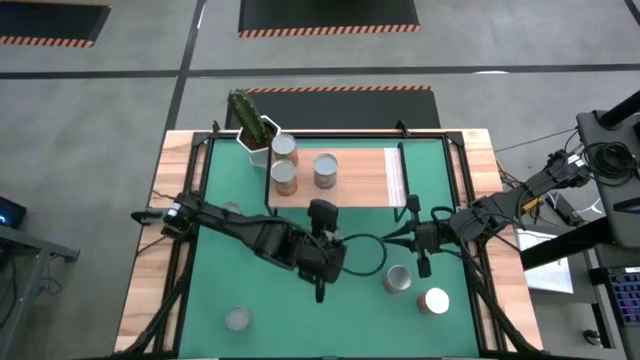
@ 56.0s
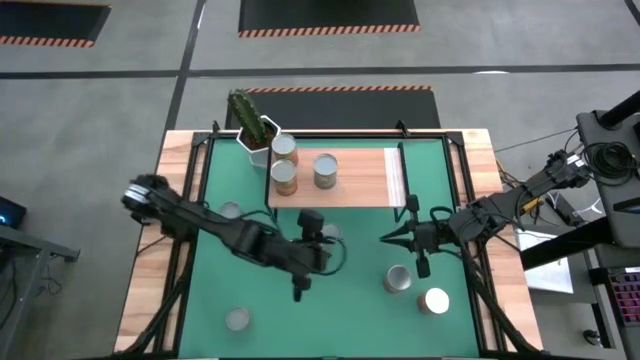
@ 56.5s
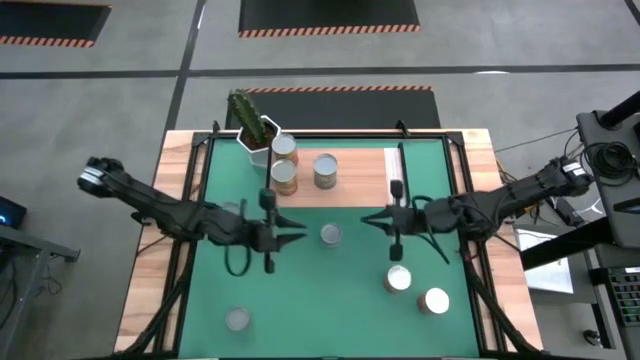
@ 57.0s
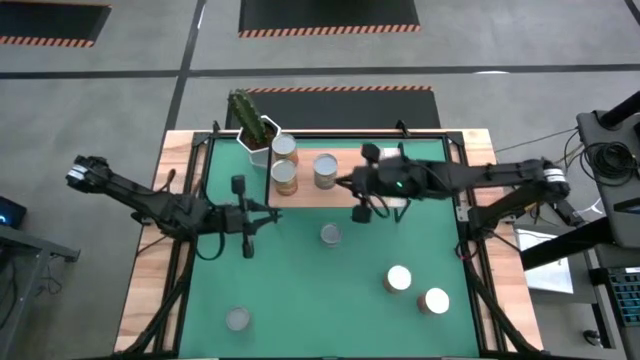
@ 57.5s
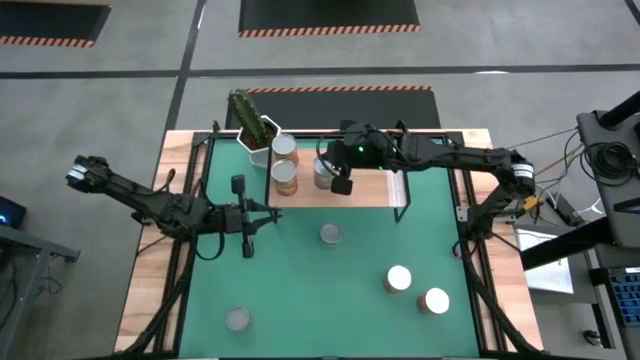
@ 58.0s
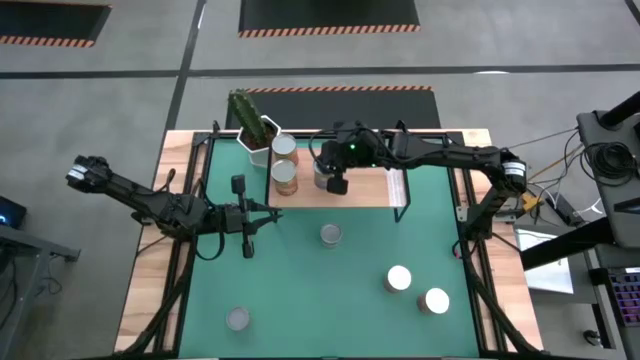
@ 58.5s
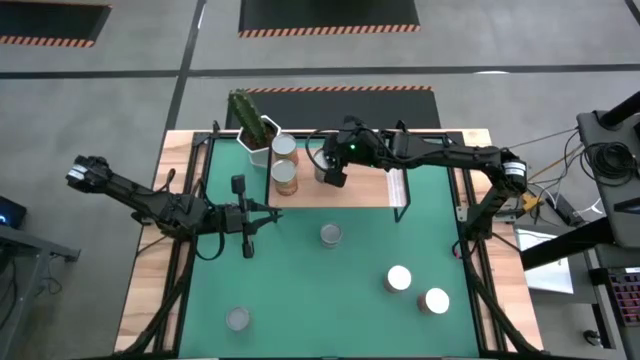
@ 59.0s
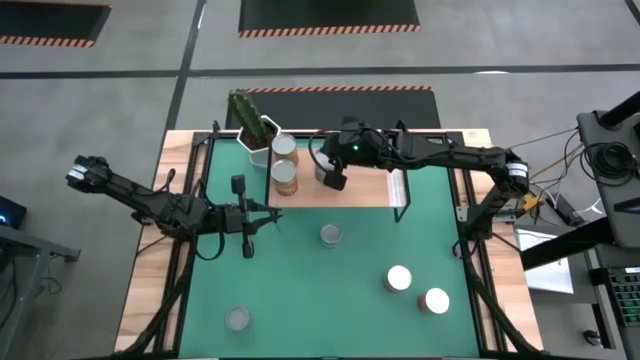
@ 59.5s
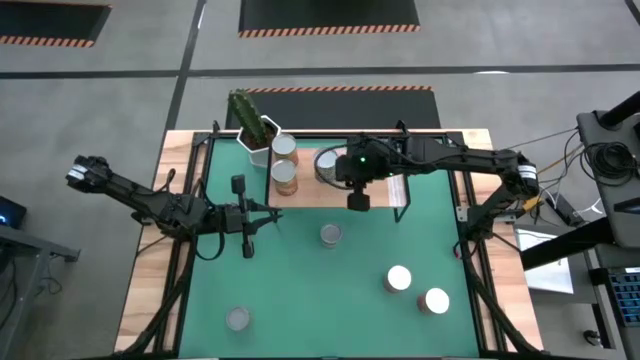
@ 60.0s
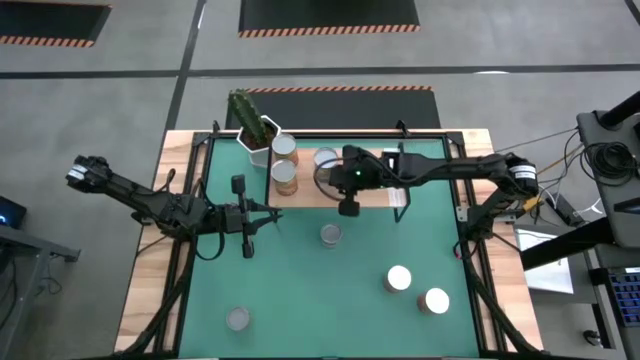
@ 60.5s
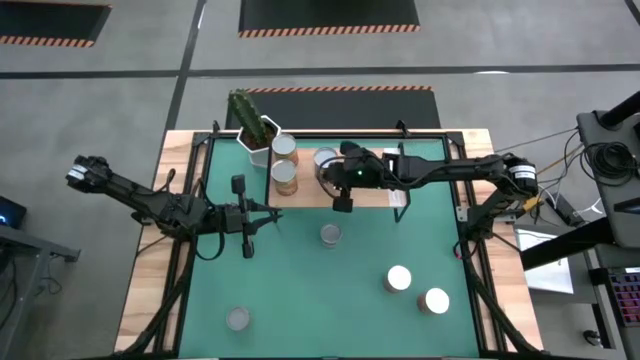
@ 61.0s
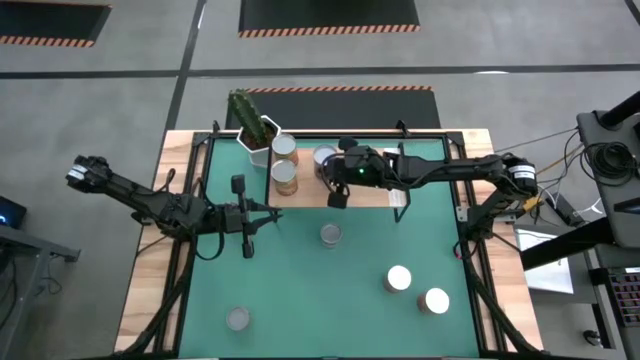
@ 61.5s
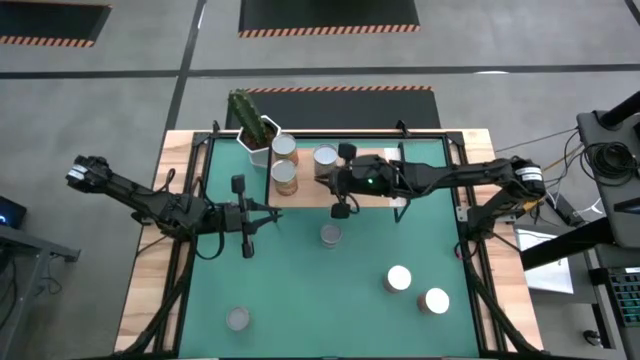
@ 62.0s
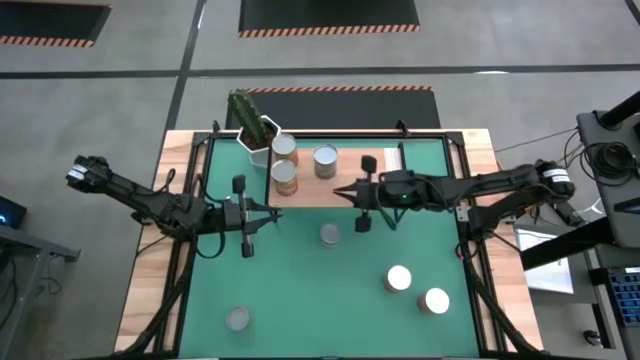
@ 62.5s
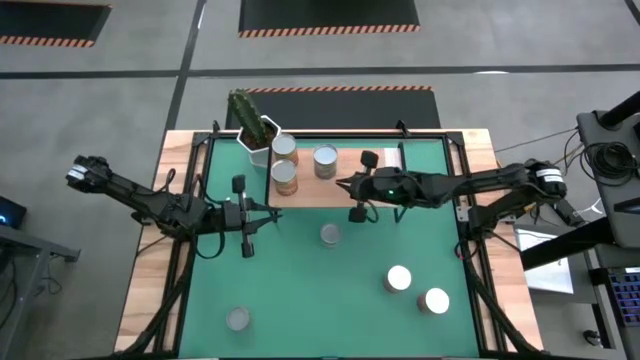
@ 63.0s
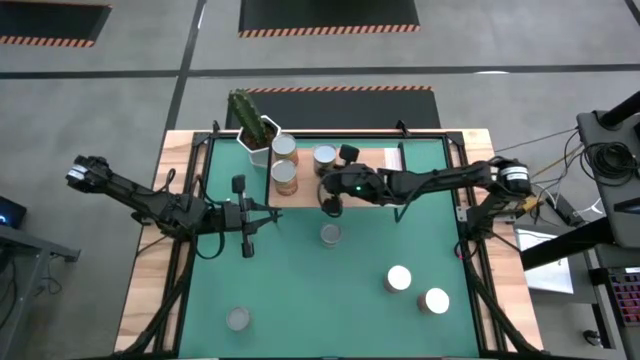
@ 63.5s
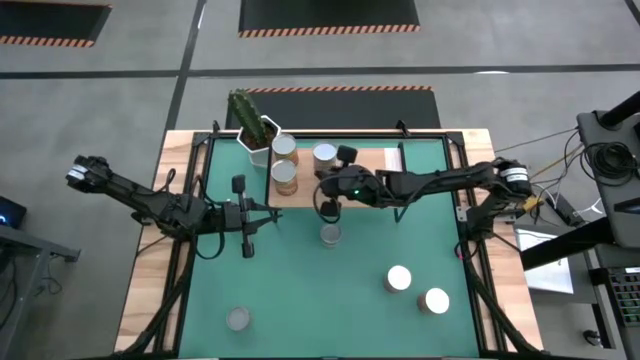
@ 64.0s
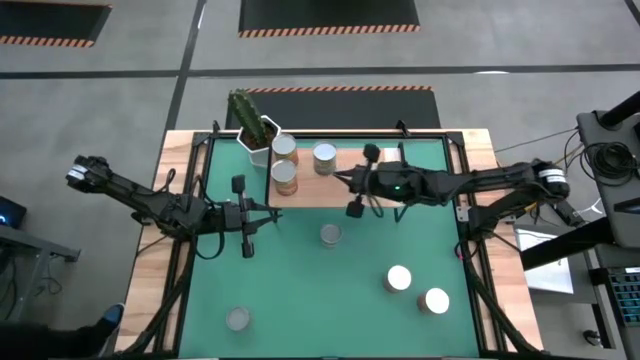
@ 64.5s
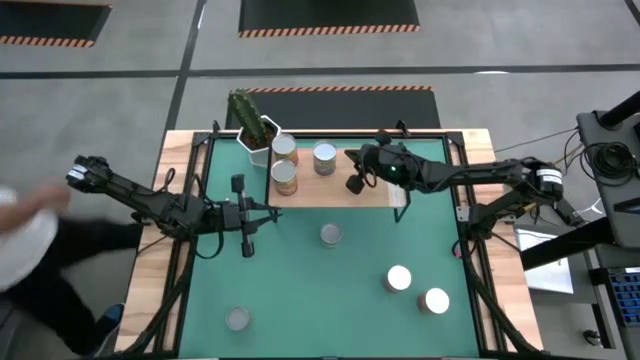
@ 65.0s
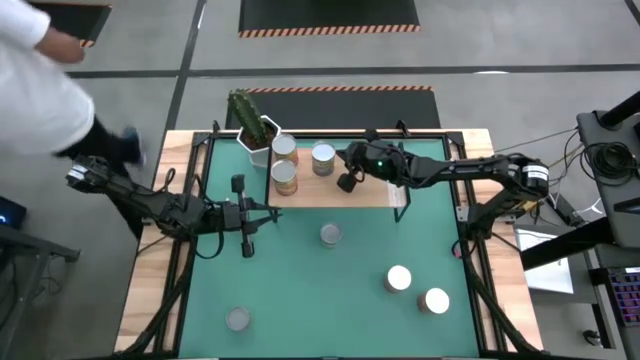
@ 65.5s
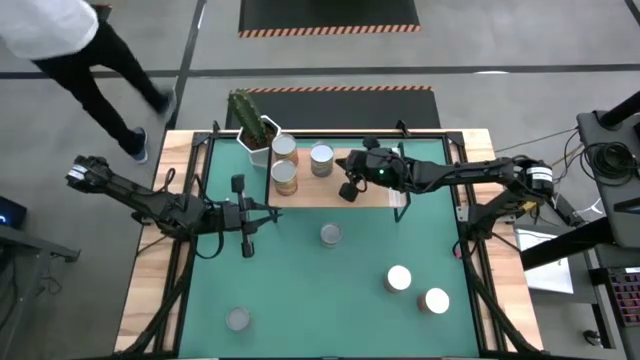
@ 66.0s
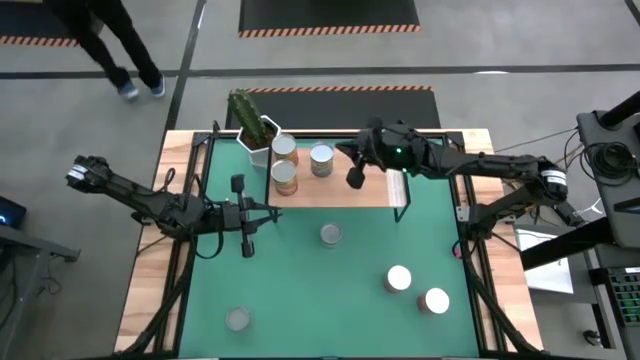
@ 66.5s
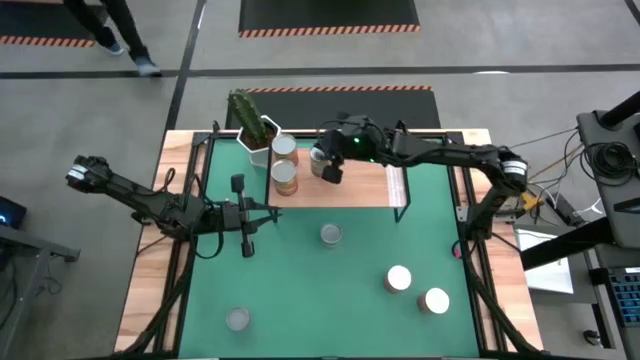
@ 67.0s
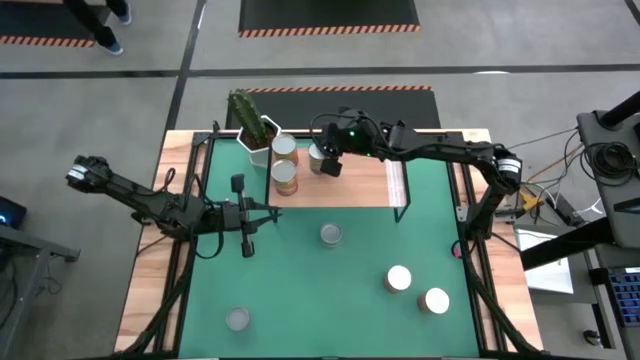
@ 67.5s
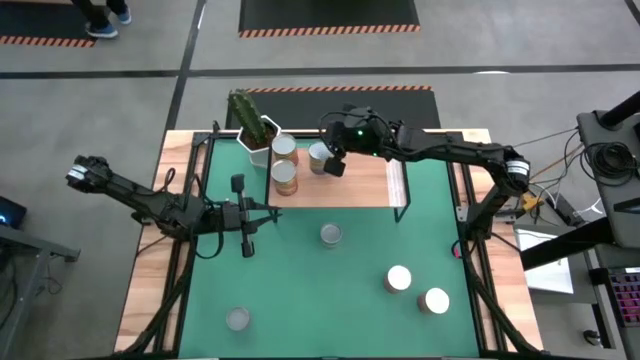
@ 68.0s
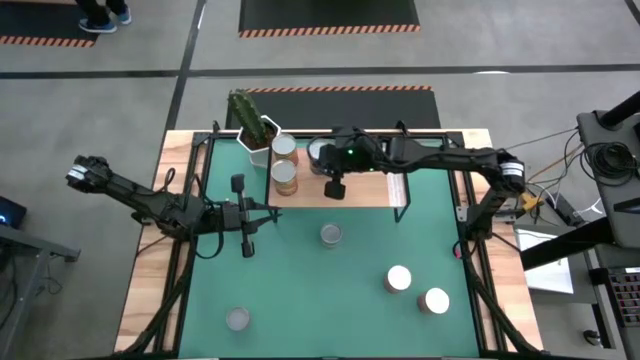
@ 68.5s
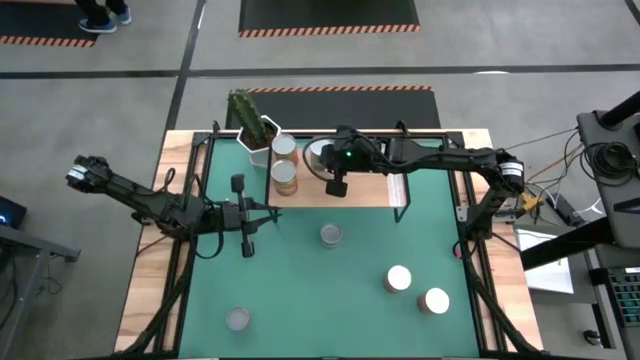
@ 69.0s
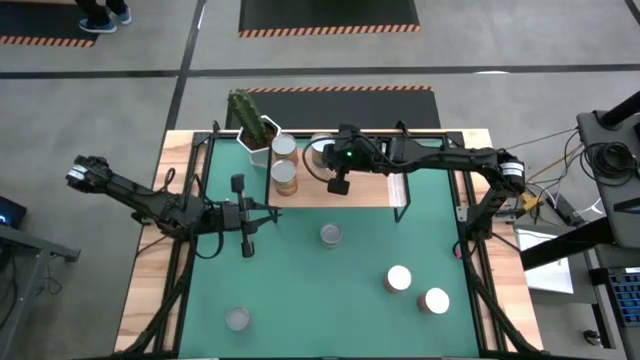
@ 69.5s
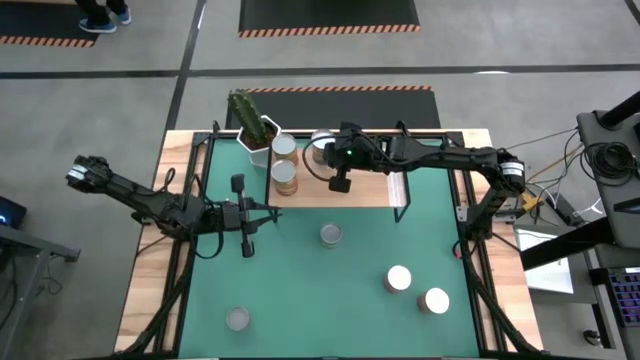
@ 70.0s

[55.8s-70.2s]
Task: Pick and place cans onto a shelf
Put the canned peas on the shelf

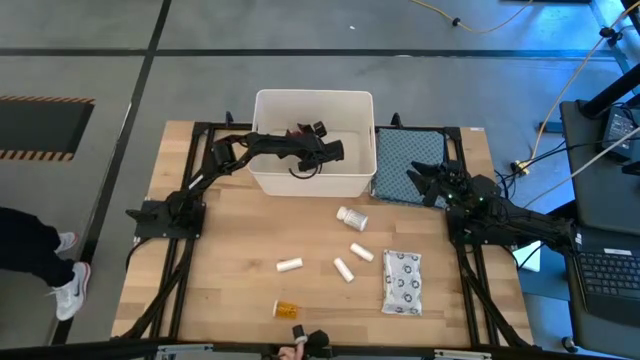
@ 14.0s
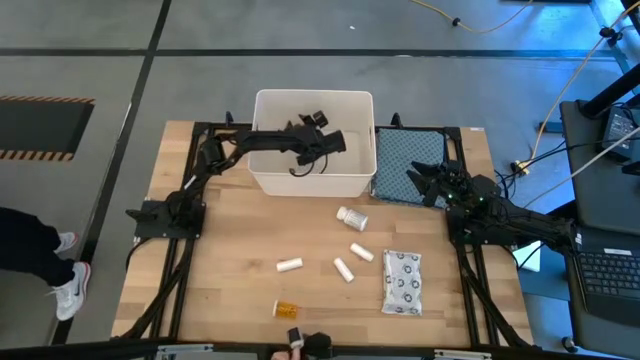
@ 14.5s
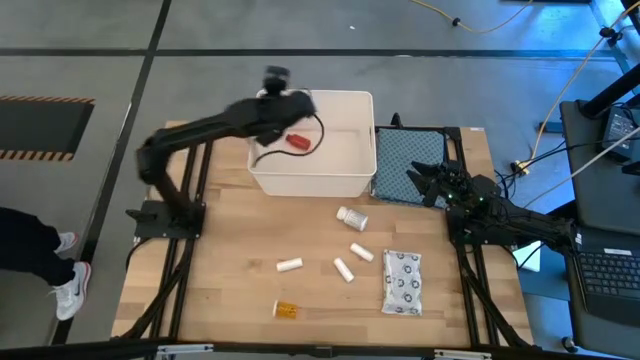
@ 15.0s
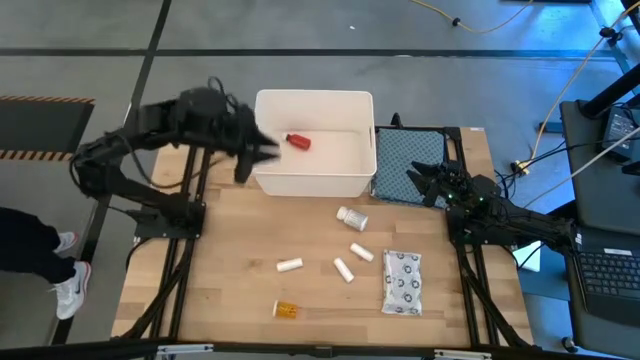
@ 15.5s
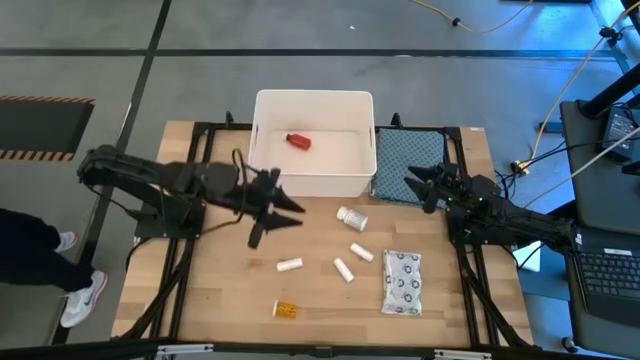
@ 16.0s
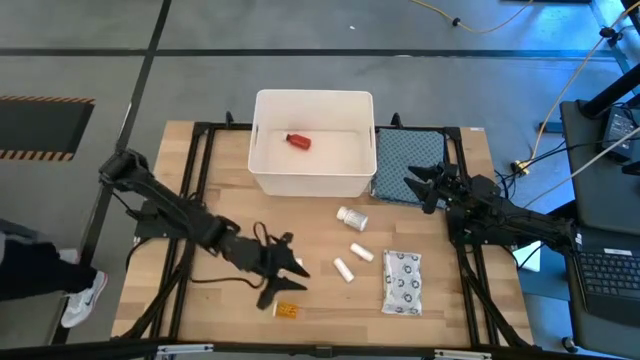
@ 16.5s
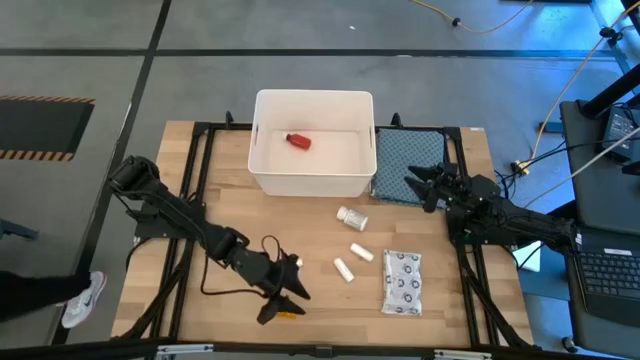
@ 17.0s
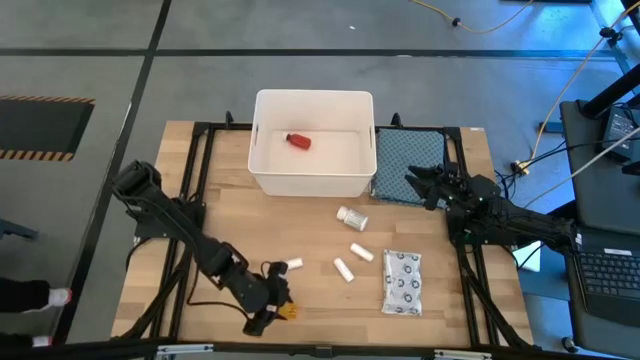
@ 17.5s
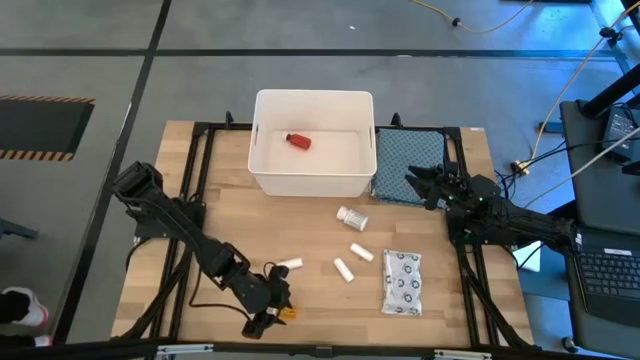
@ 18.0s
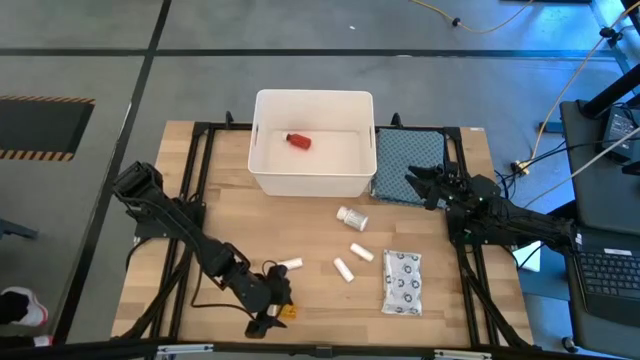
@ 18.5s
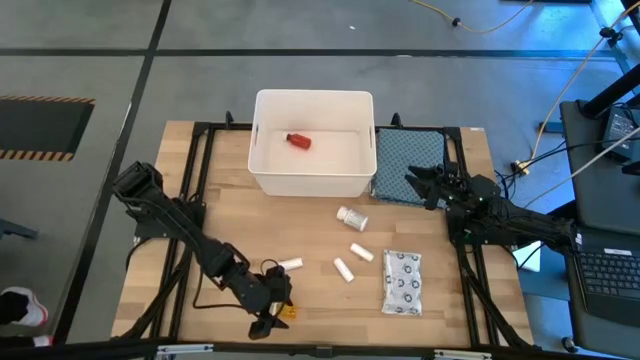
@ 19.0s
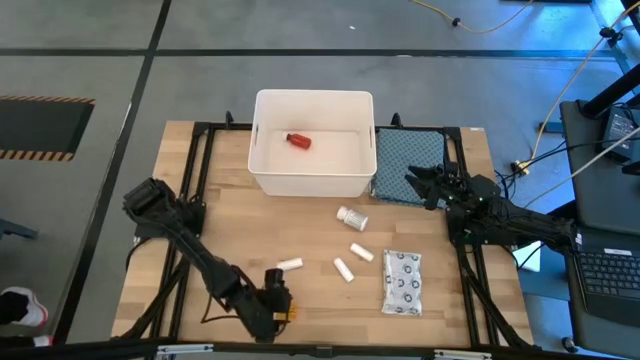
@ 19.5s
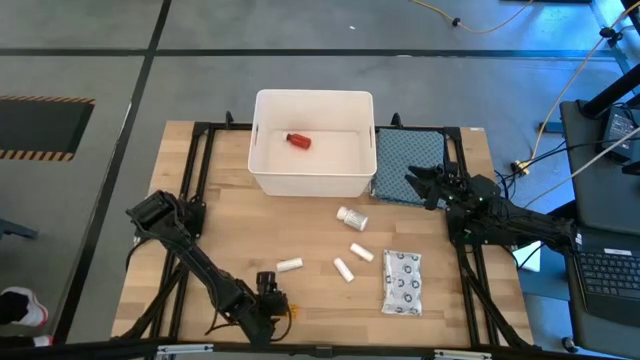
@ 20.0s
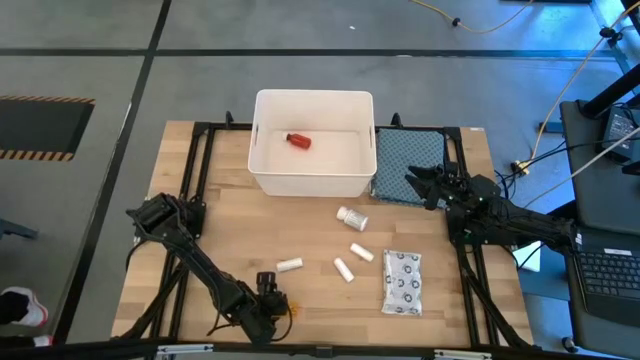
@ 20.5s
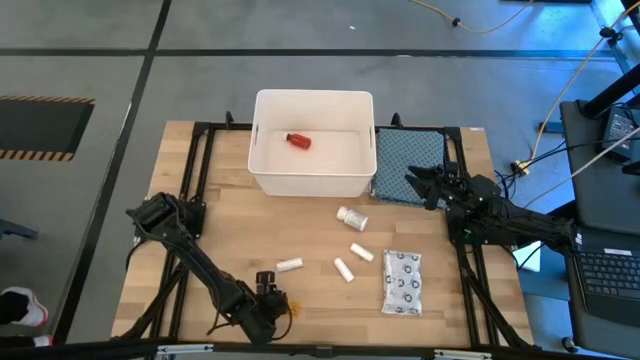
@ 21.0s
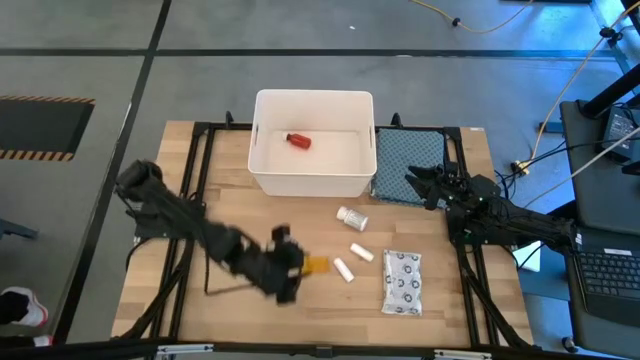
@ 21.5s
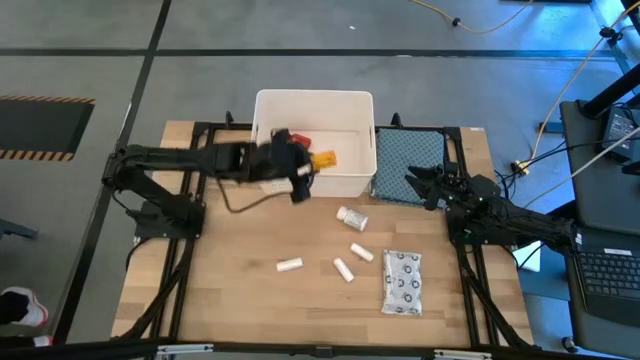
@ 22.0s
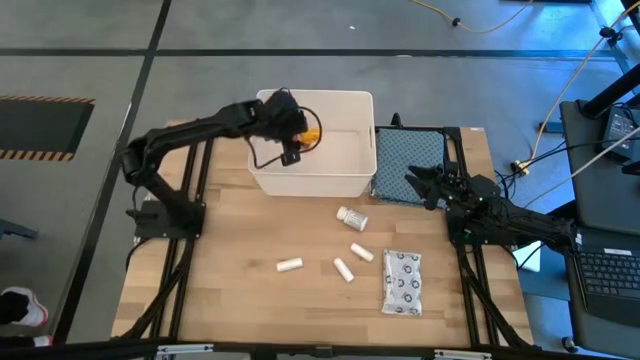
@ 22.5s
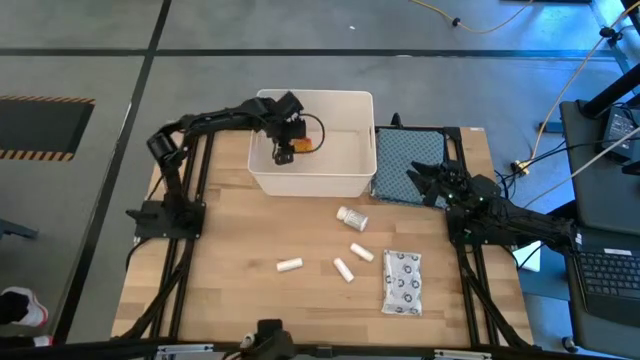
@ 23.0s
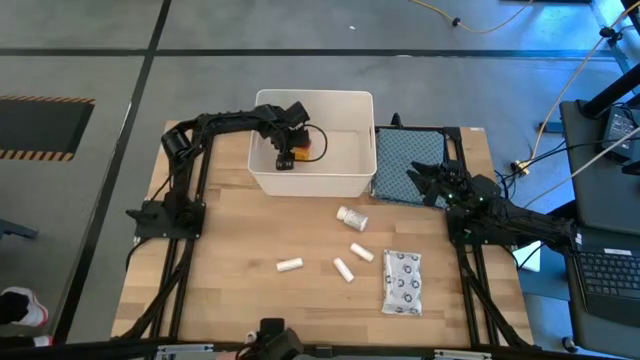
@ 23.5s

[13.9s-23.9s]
Task: Pick & place medical supplies in basket/bin
Put the orange medicine bottle into the white bin
